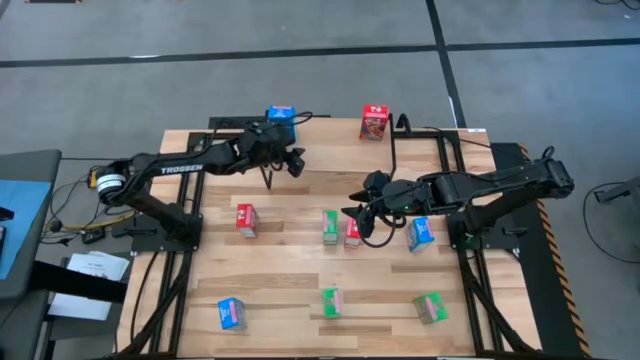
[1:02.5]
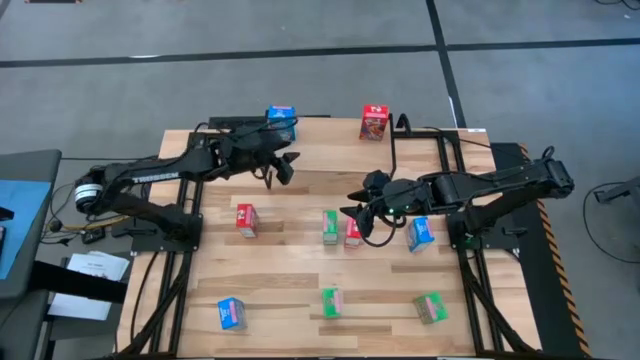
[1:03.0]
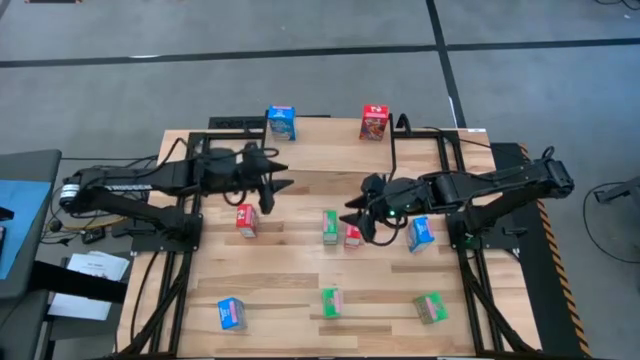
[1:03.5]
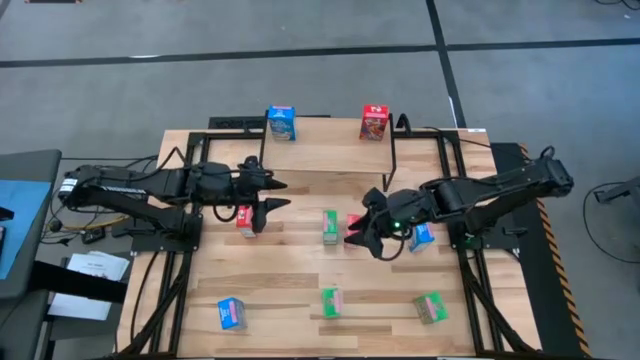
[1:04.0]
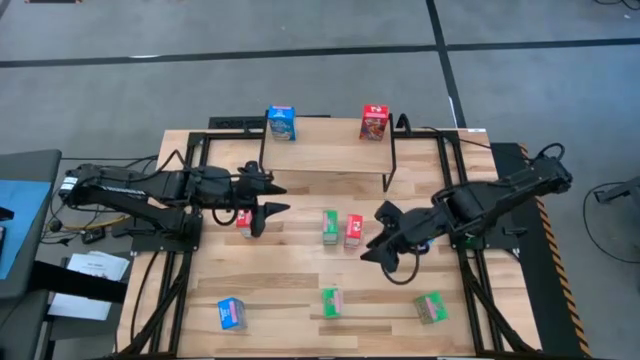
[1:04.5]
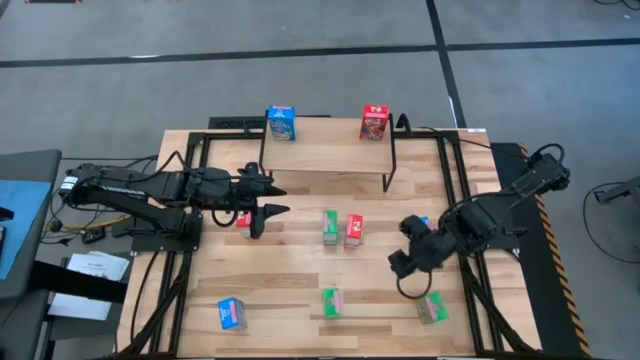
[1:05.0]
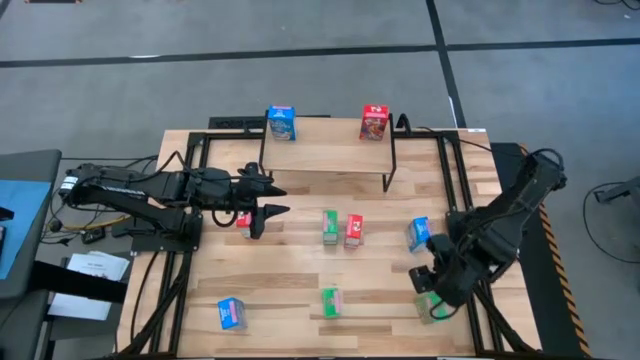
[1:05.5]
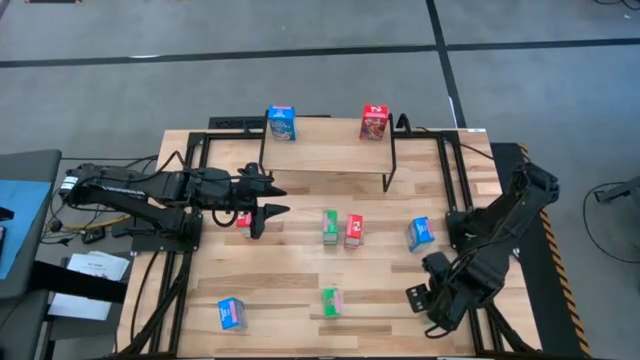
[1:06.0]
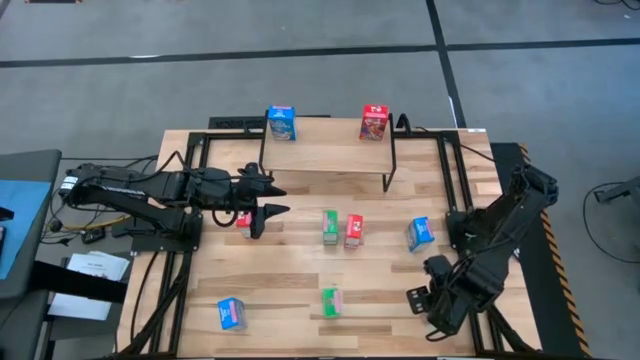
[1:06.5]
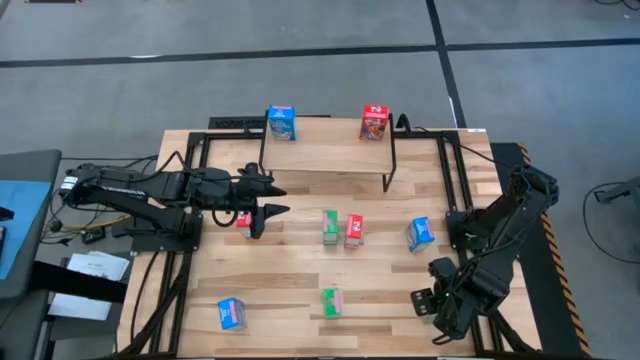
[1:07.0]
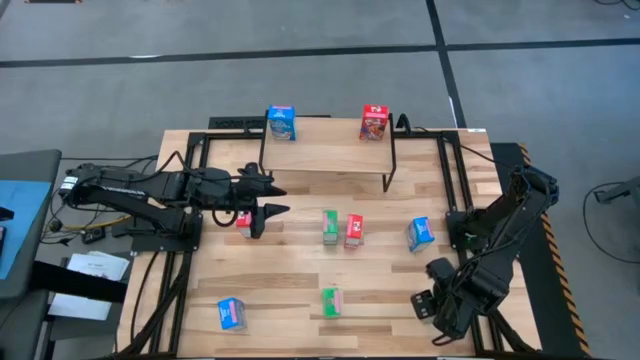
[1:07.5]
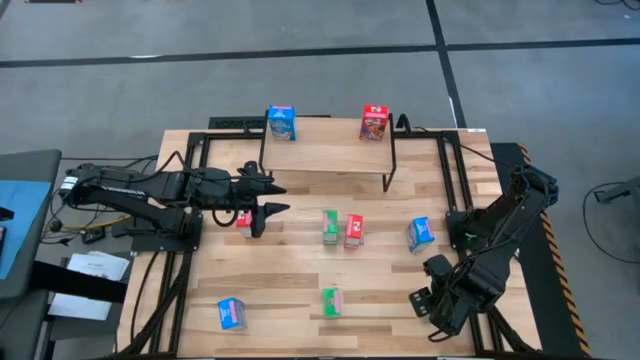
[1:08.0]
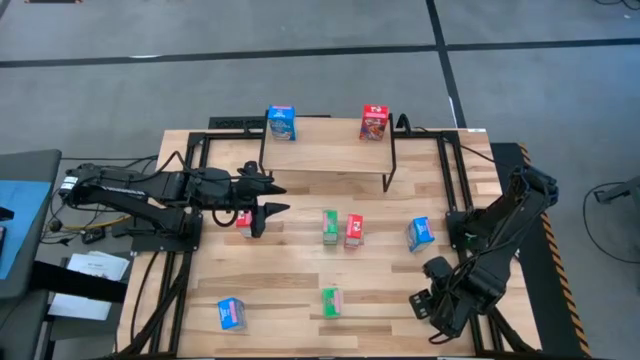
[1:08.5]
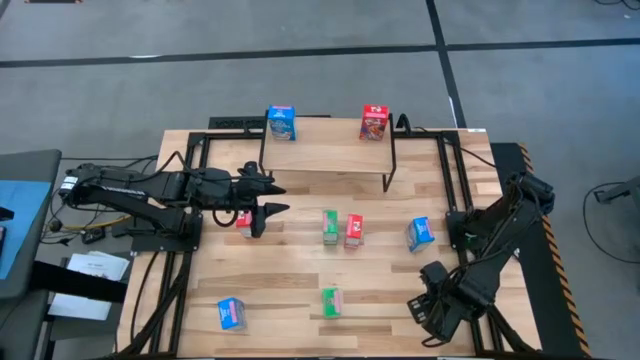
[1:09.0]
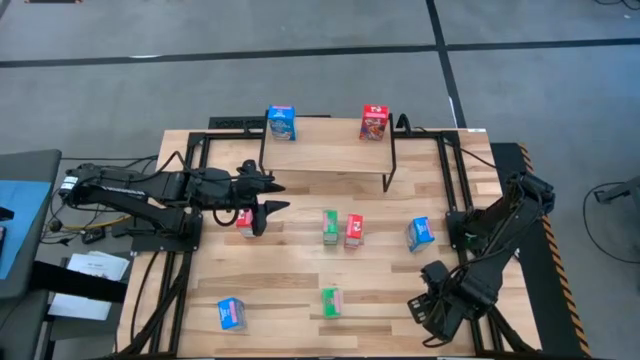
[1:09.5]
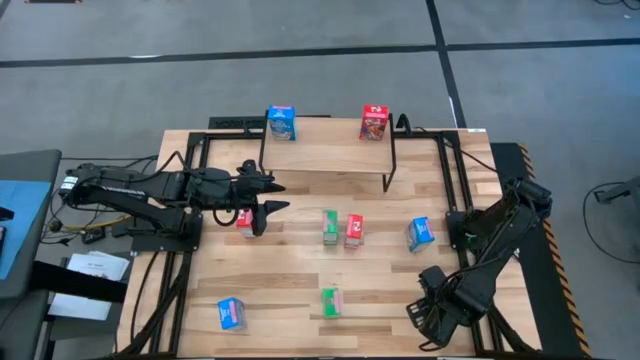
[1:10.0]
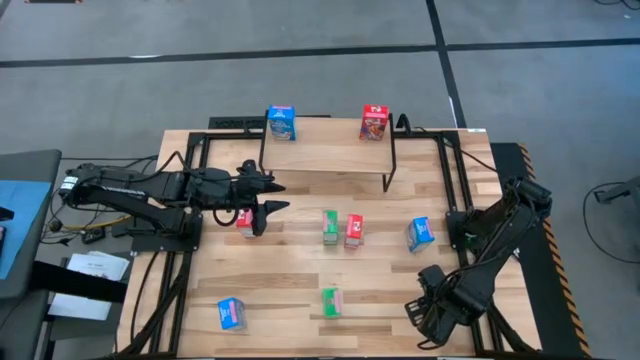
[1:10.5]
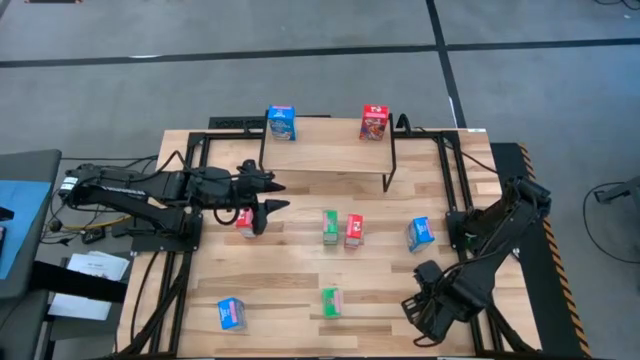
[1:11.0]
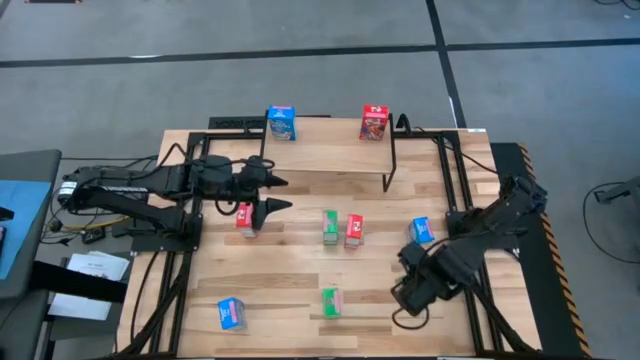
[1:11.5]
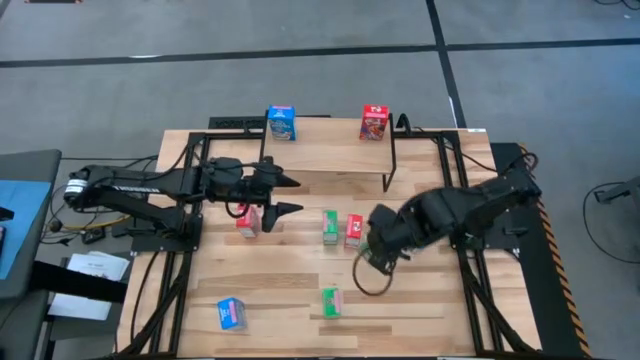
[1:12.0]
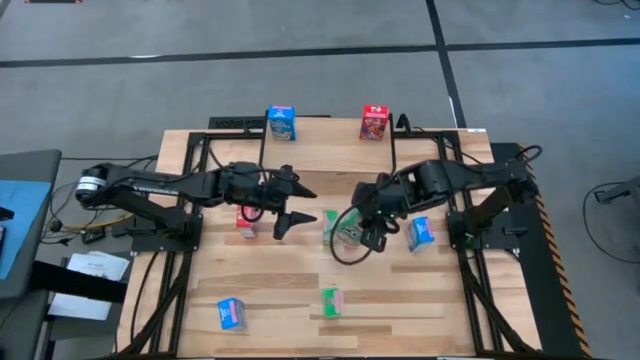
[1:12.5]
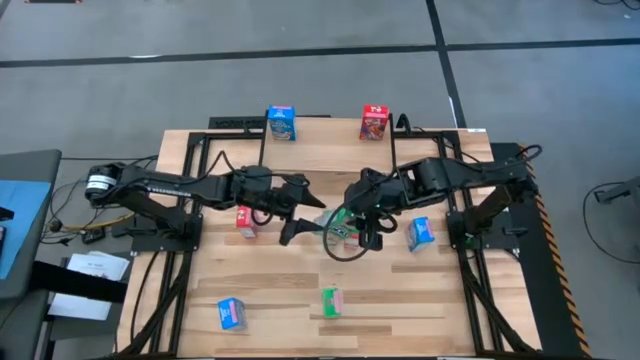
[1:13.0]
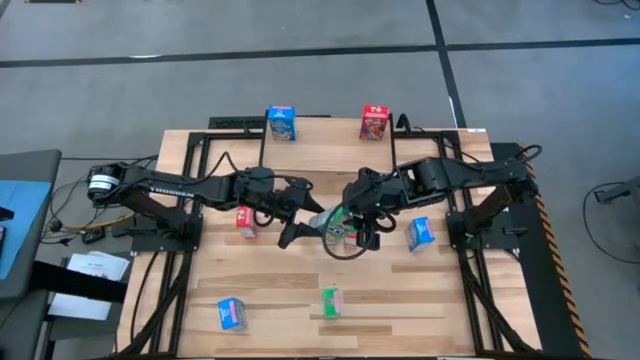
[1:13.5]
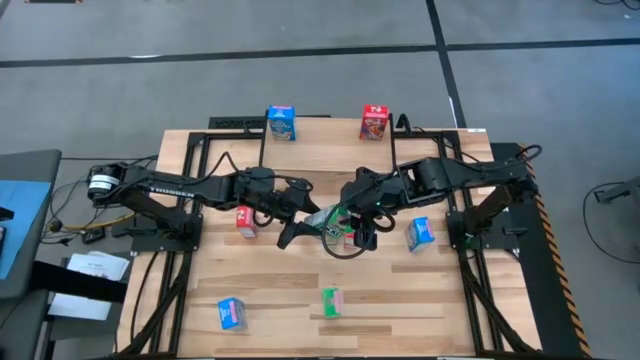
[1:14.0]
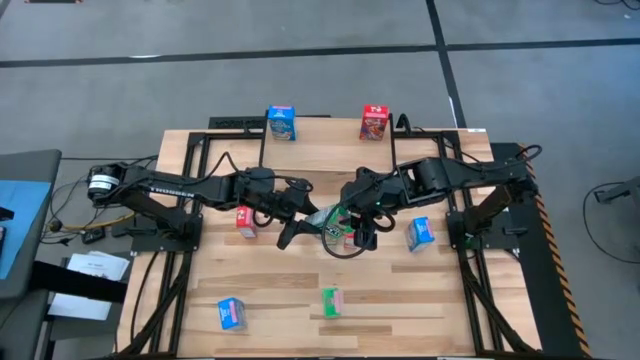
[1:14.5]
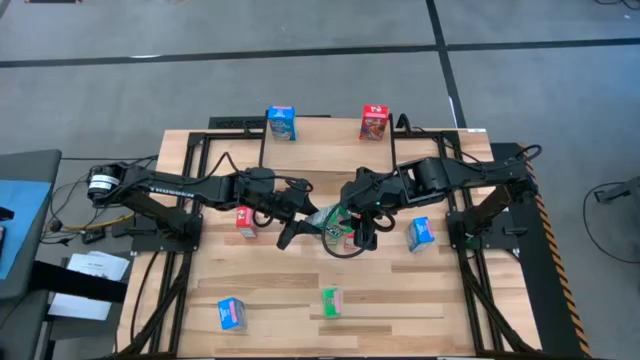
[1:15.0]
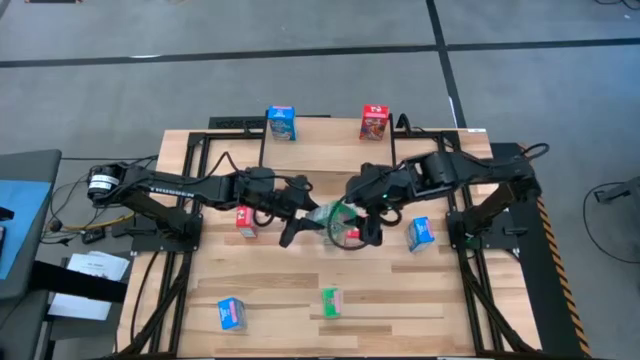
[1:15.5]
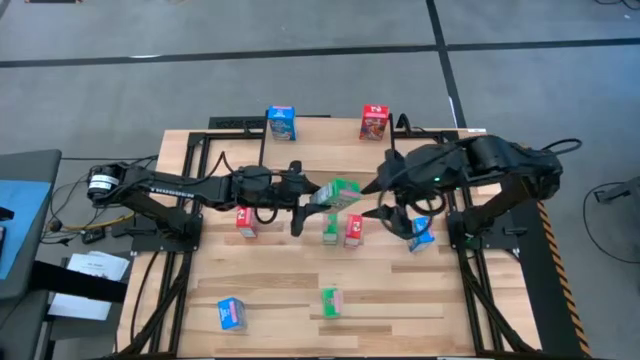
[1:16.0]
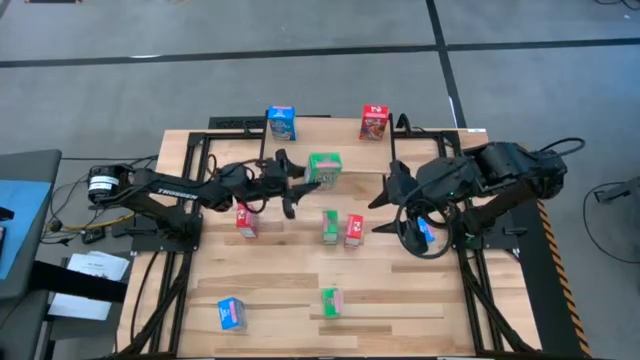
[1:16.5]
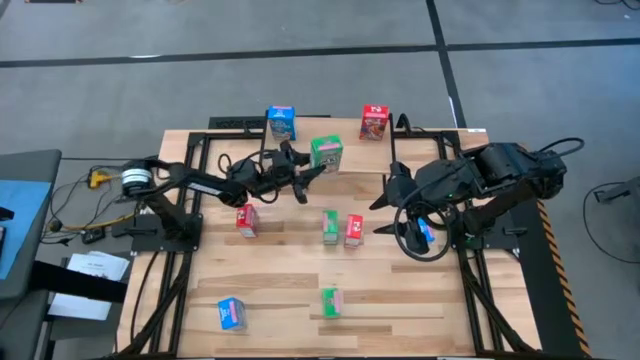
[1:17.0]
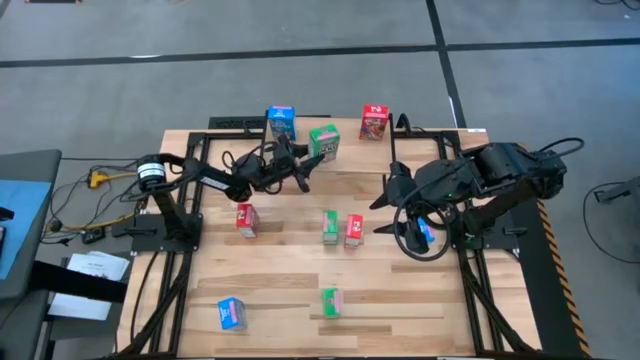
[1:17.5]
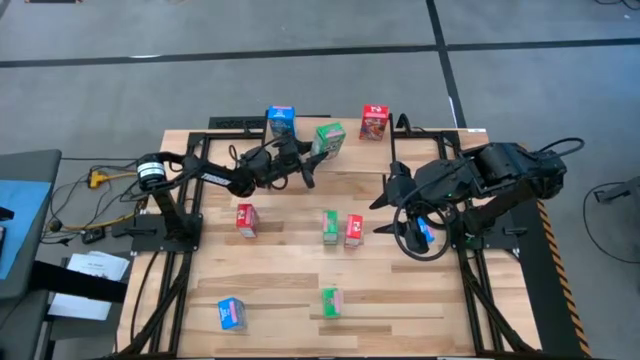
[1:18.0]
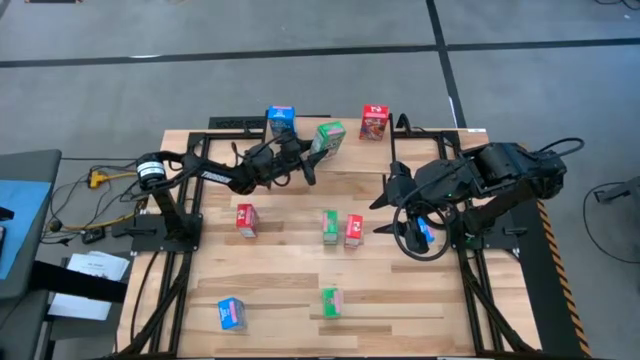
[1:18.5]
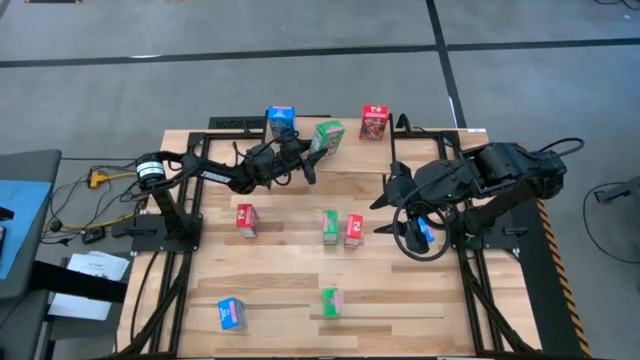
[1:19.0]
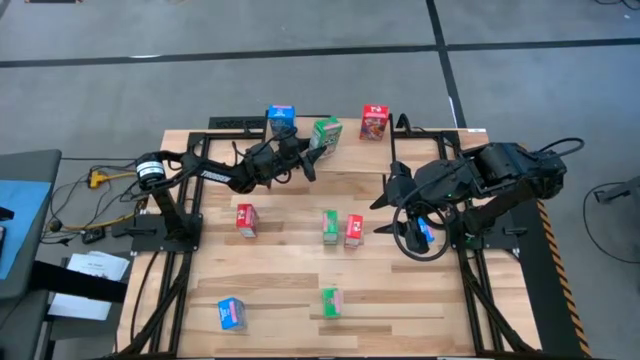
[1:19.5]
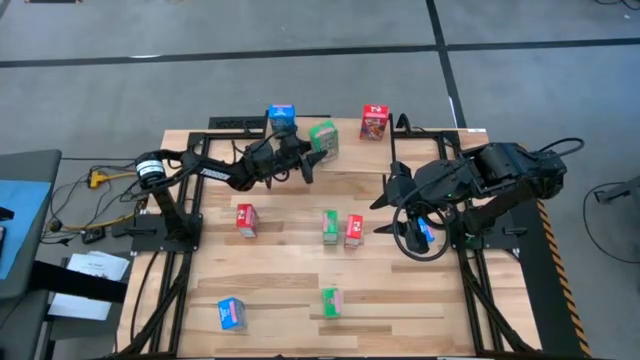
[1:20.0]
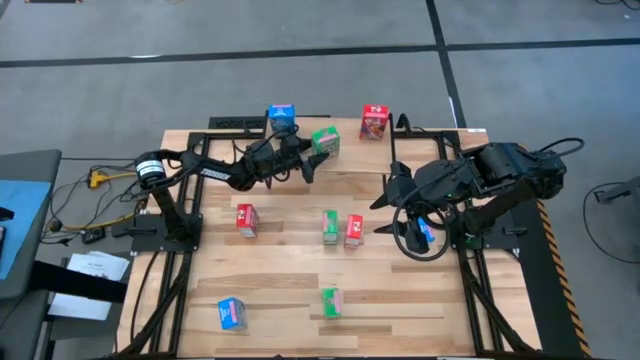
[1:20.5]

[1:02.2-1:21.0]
Task: Stack cereal on shelf
Put the bottom right green cereal box on the shelf

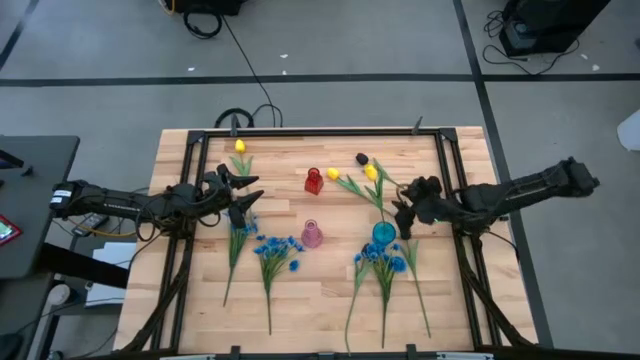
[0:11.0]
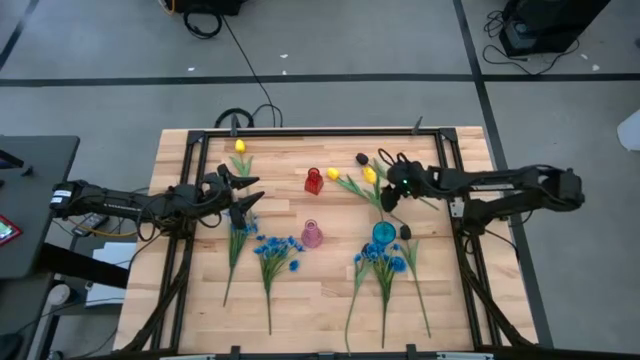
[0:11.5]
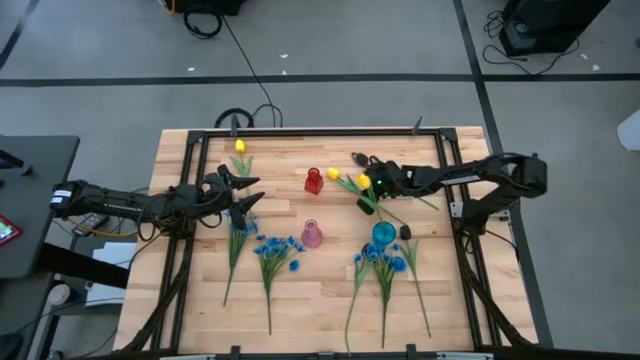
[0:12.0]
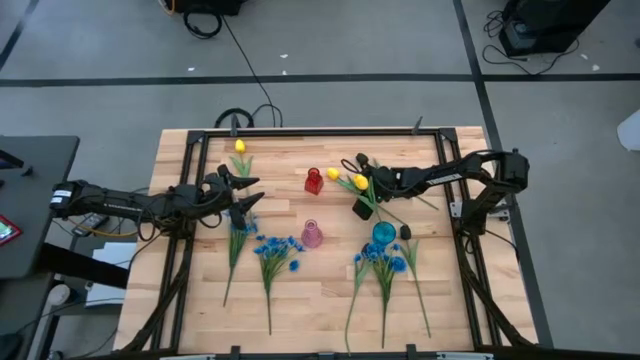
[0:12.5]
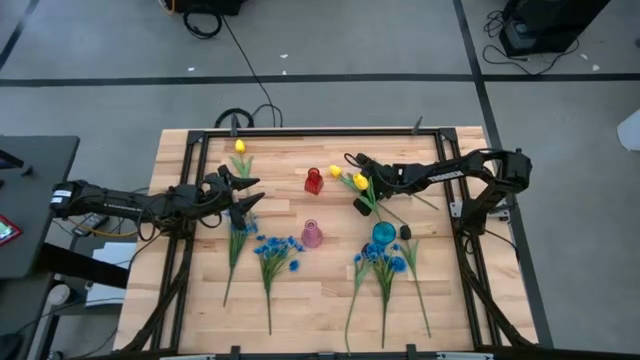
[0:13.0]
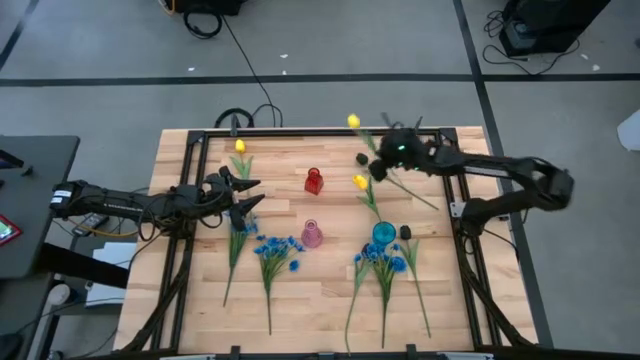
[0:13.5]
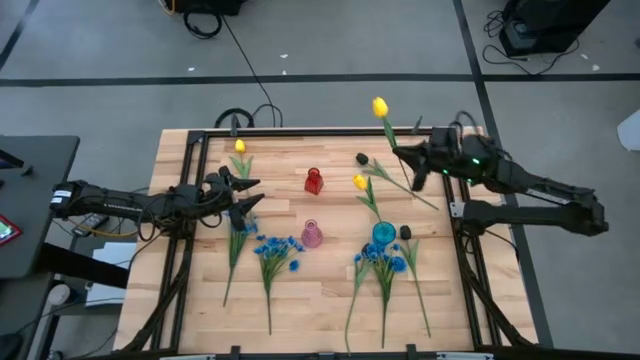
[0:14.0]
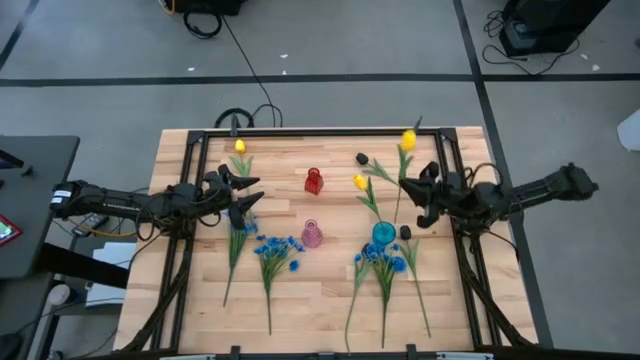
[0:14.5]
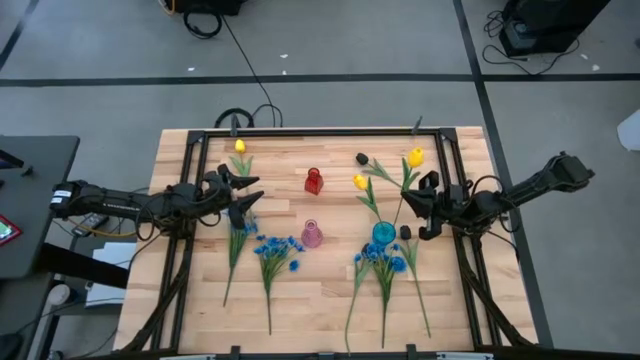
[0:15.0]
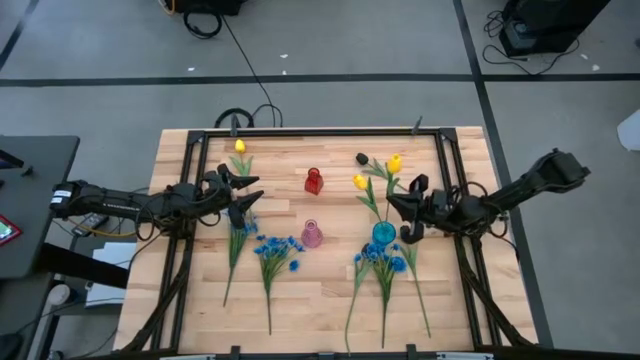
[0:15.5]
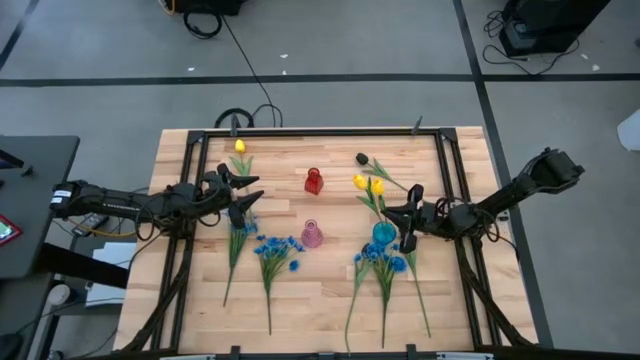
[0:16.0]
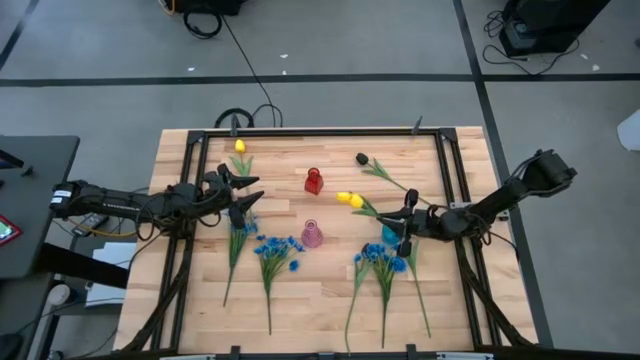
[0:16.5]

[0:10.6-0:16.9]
Task: Sort flowers into vase by color
Put the right yellow flower into the blue vase
